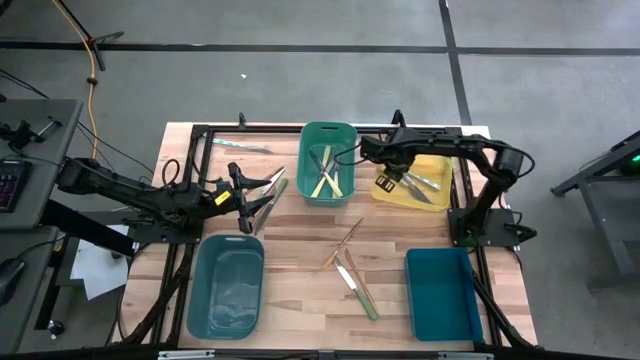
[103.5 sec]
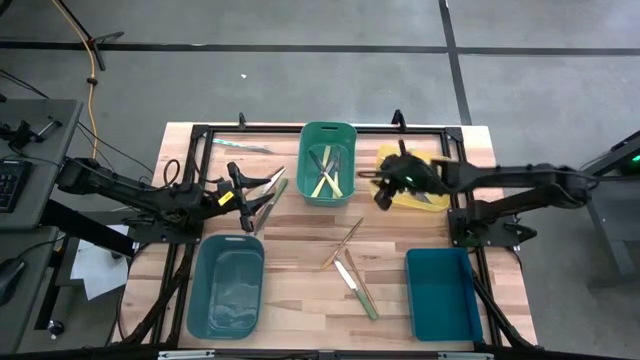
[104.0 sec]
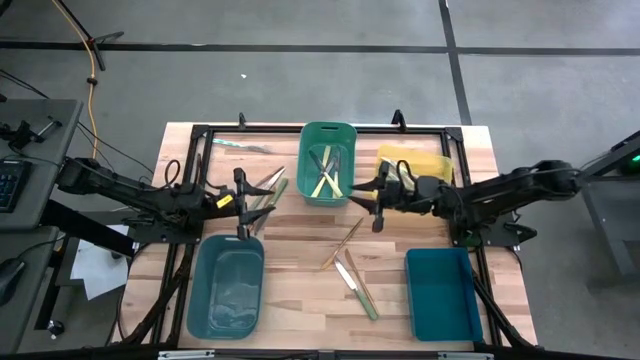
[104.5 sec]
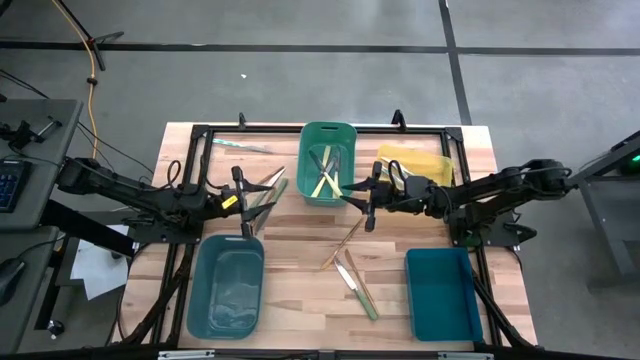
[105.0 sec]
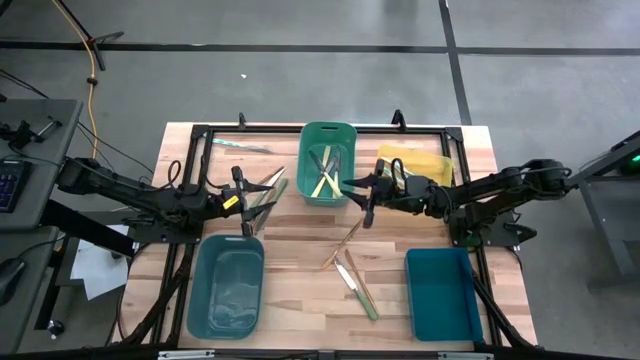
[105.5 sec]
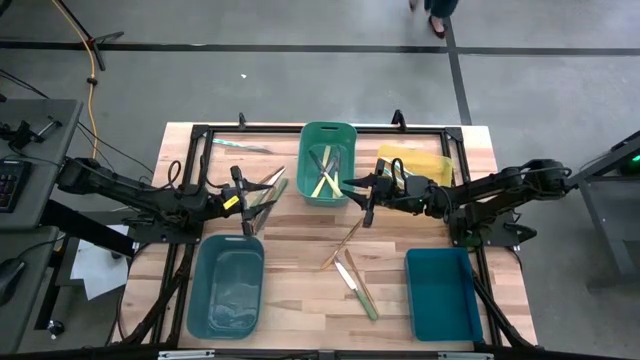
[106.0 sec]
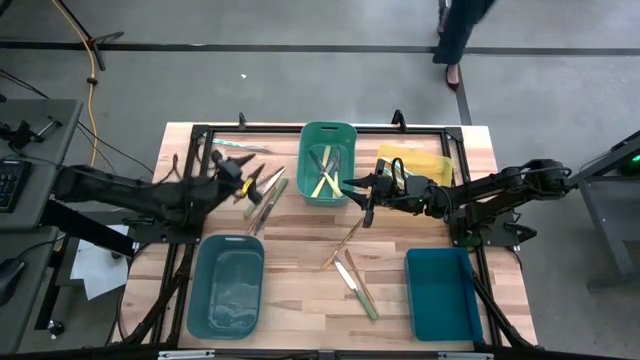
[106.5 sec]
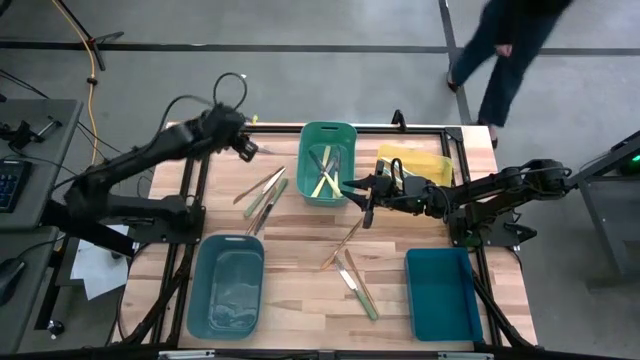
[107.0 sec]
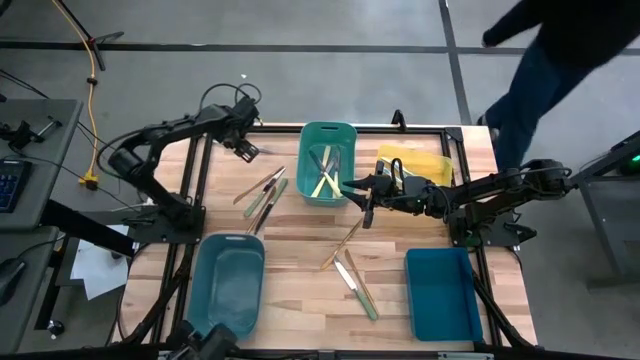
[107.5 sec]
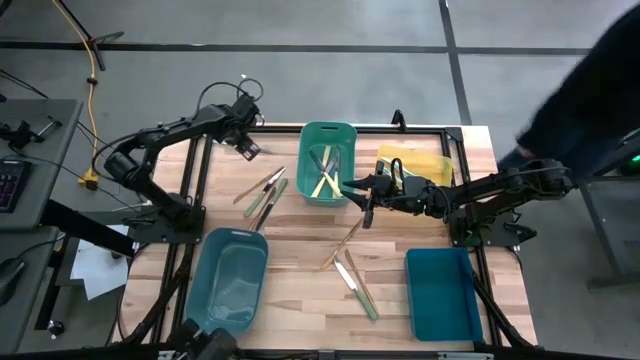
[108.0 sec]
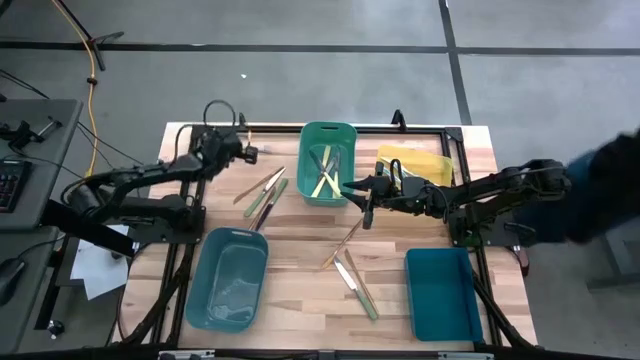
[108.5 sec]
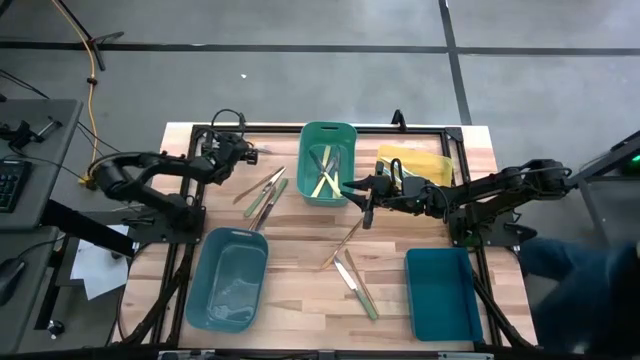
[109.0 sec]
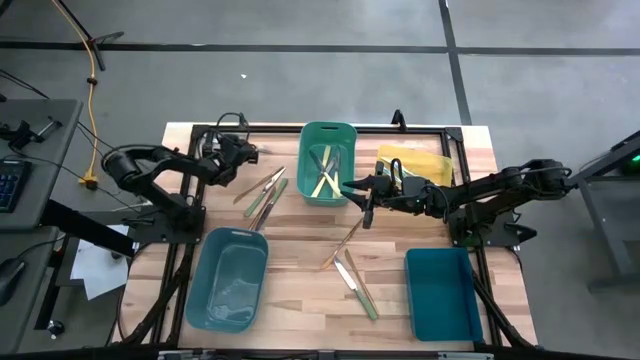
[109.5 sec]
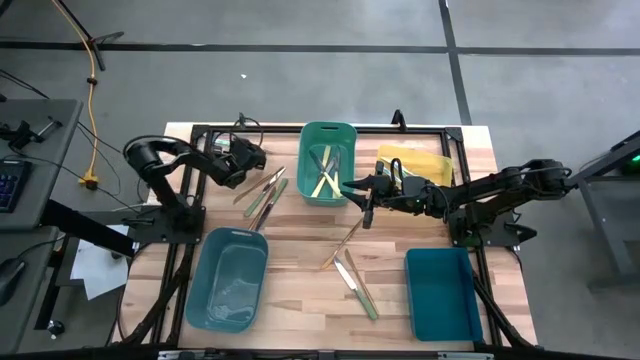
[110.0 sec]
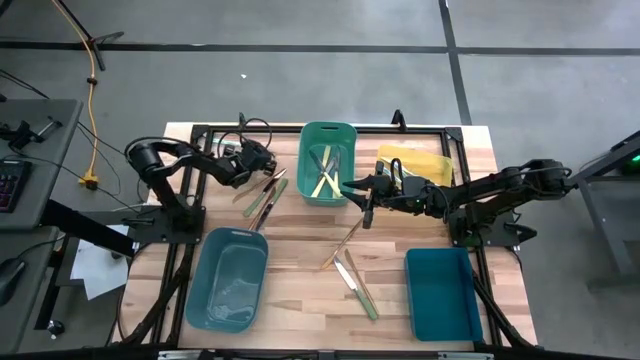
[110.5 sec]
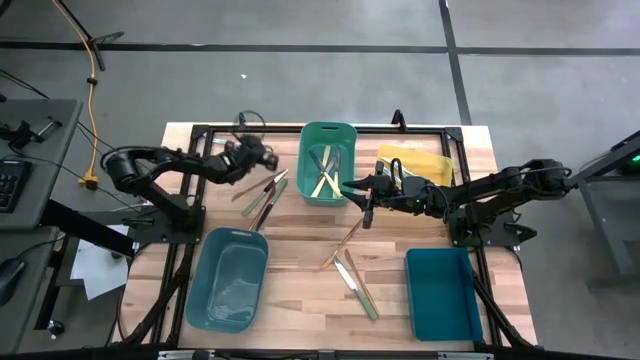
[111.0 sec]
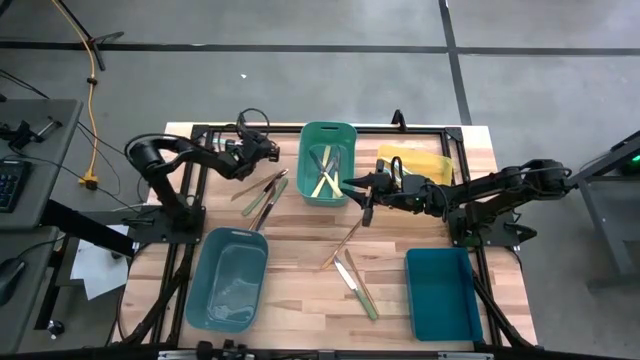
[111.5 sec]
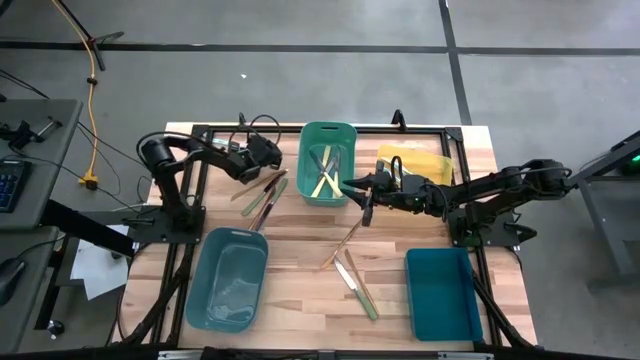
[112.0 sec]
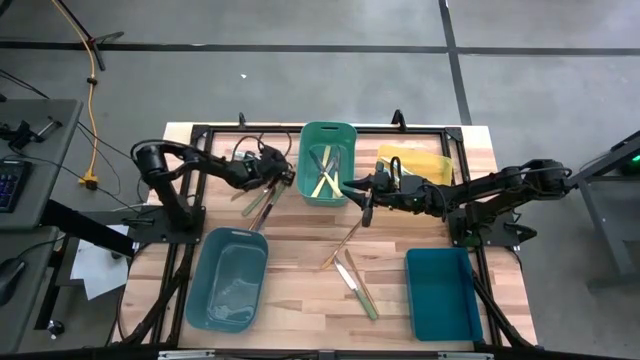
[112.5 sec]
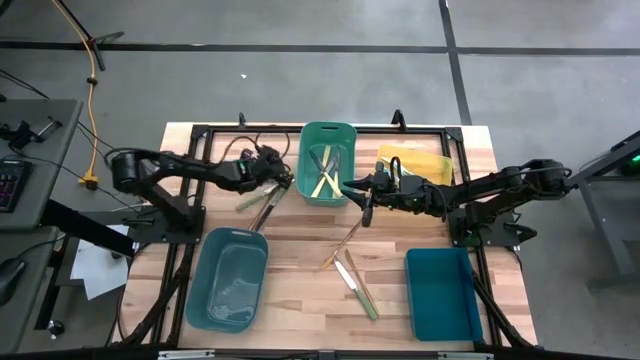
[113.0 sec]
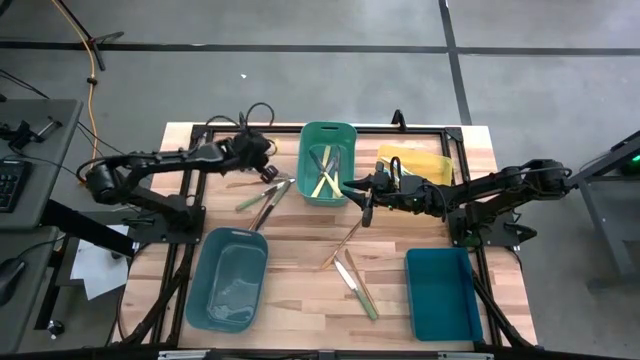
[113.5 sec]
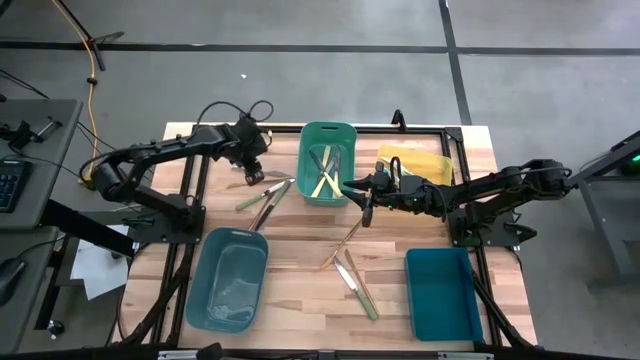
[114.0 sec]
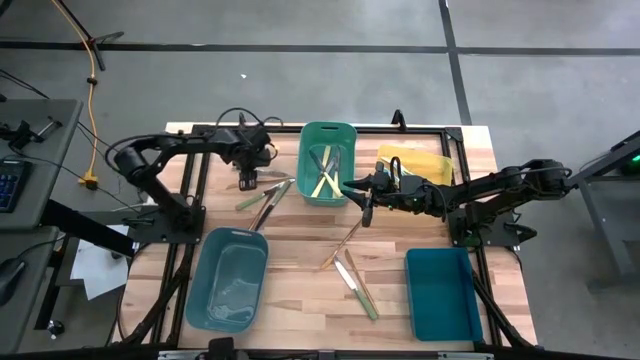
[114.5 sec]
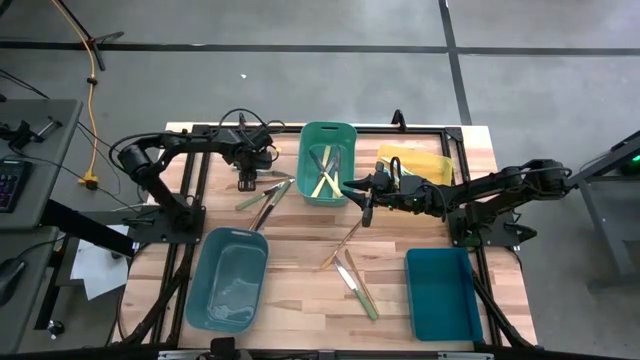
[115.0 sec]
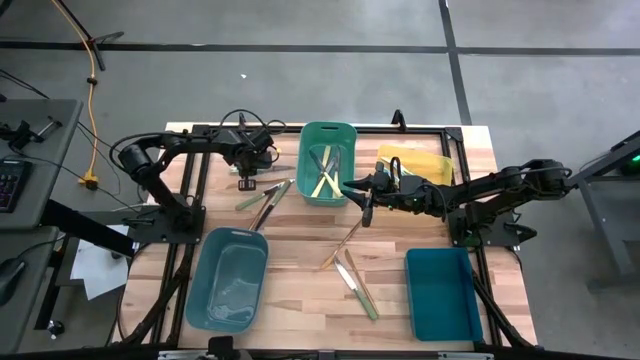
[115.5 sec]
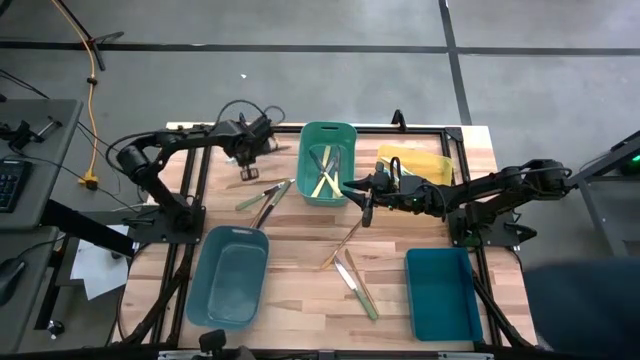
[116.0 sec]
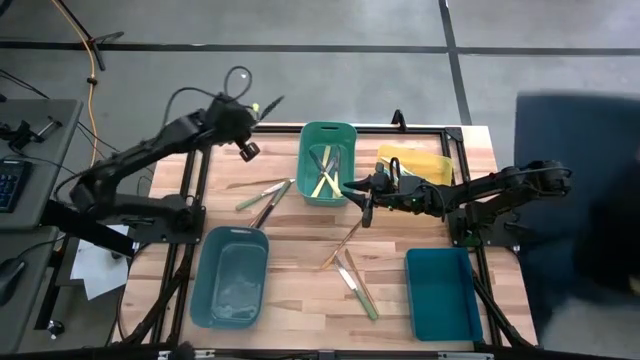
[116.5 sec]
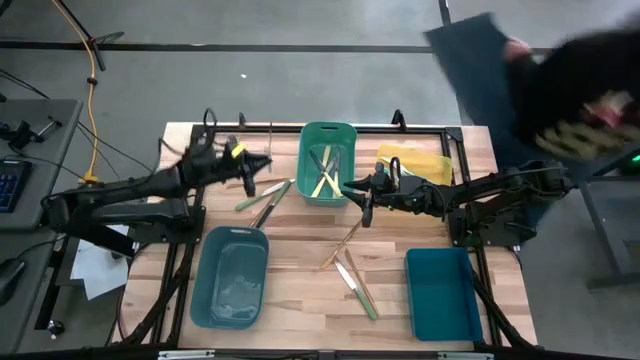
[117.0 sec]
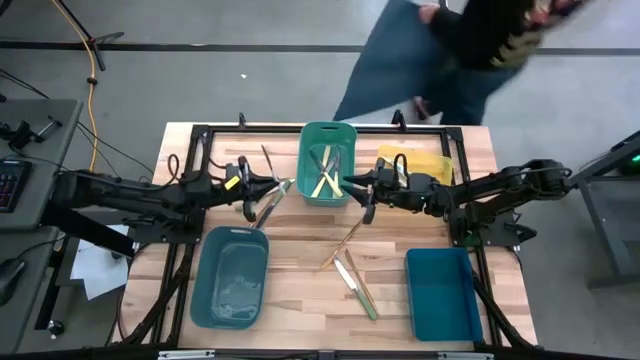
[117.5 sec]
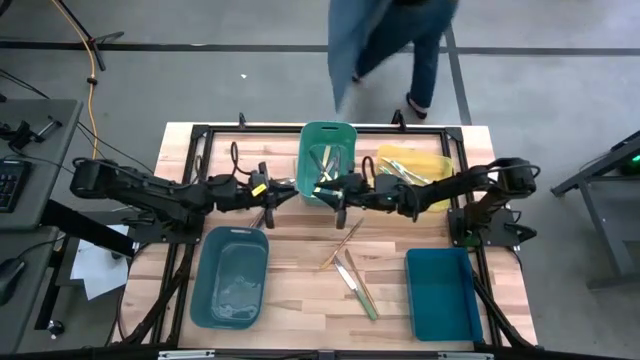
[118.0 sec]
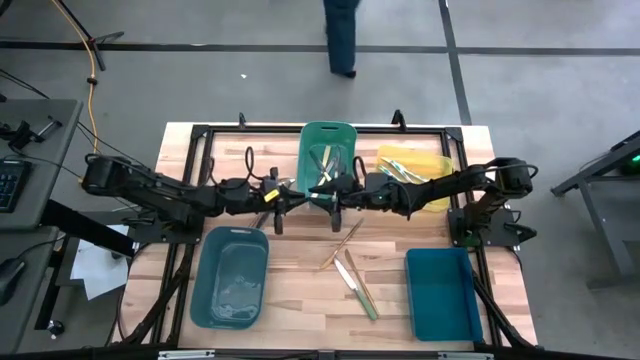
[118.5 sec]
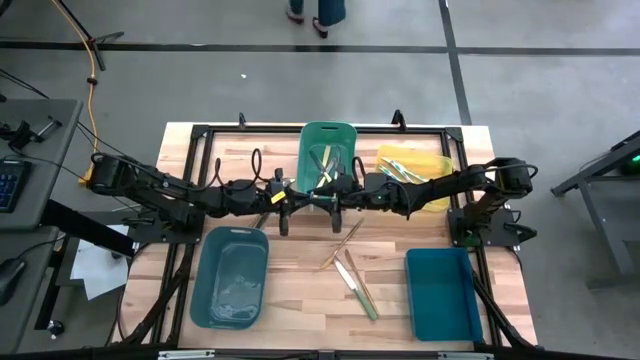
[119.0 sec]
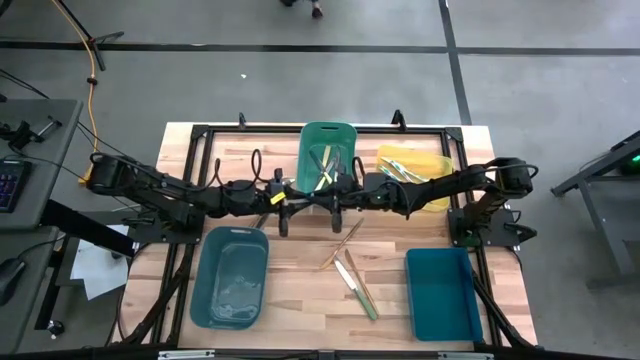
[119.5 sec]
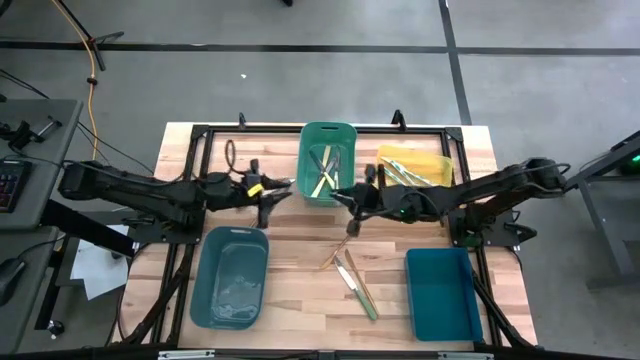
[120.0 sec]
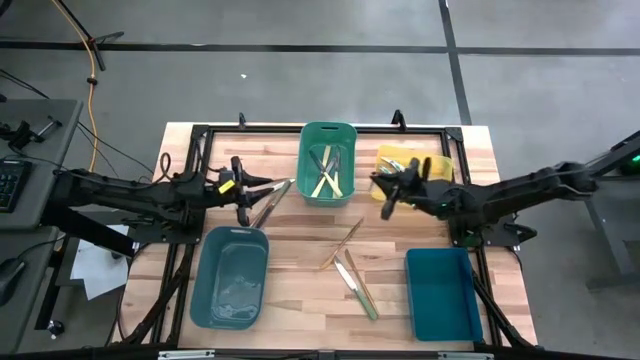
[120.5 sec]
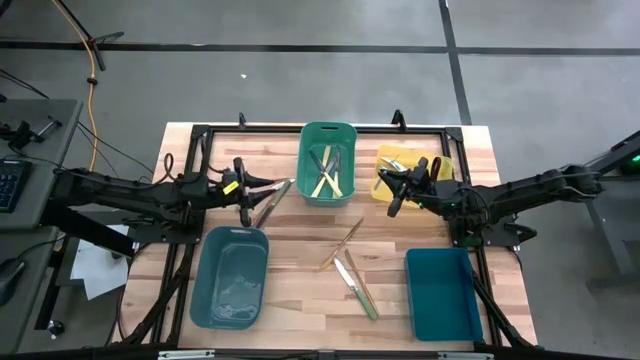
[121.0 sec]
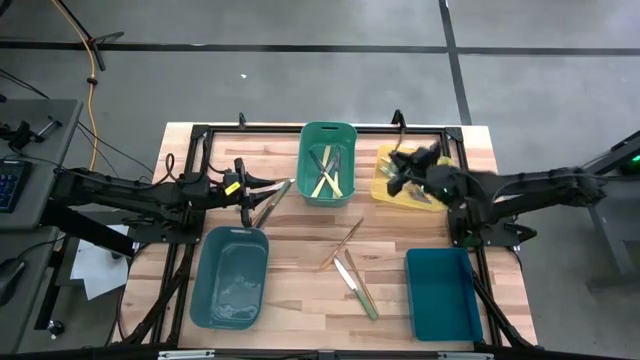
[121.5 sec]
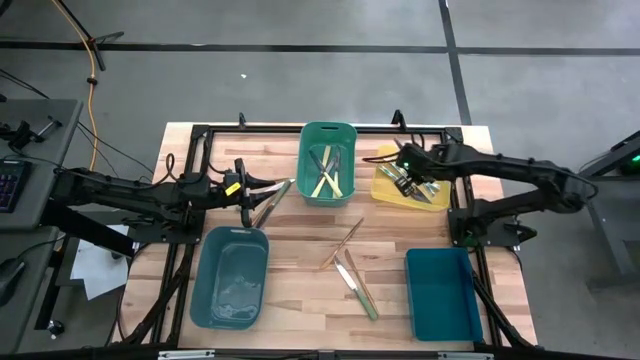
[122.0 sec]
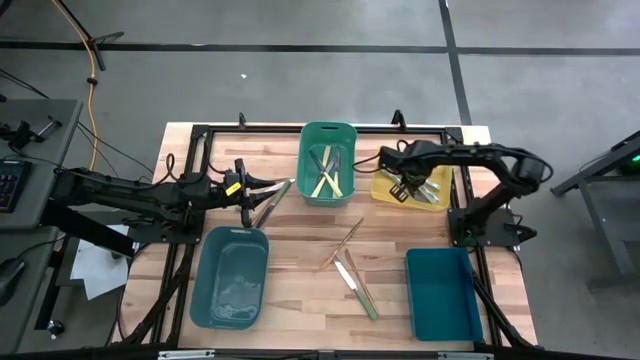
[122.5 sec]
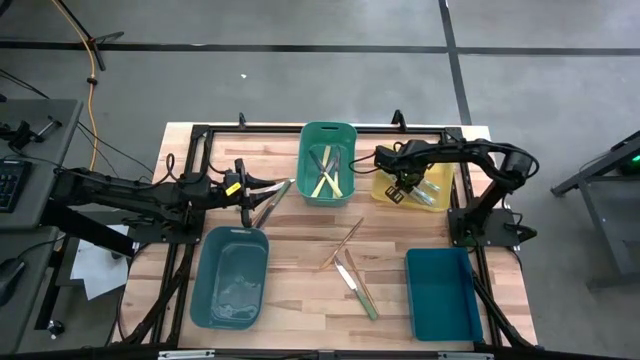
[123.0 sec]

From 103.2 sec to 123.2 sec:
Task: Sort silverware by color (type)
Put the blue patterned knife into the yellow bin
